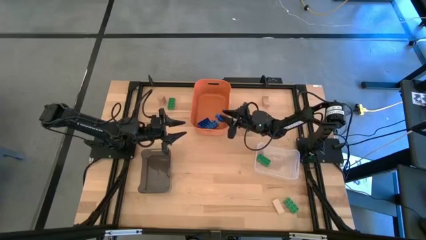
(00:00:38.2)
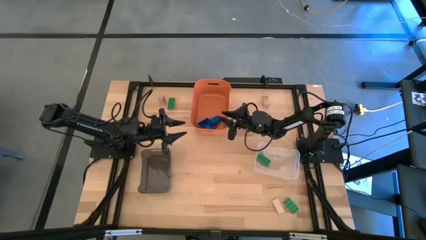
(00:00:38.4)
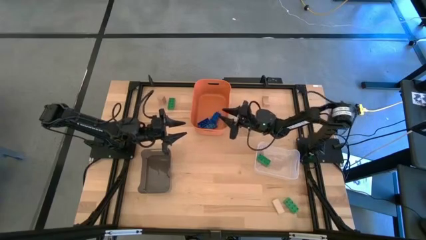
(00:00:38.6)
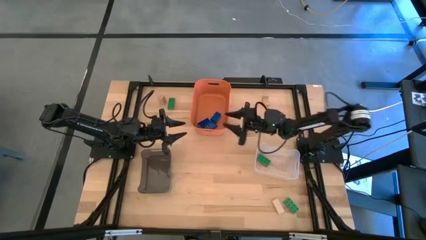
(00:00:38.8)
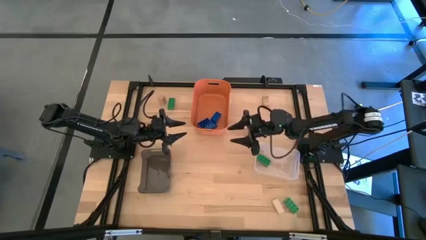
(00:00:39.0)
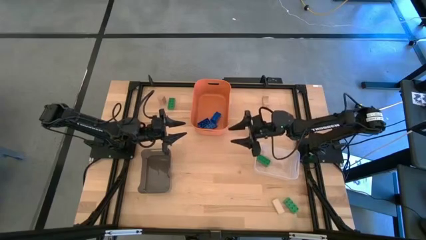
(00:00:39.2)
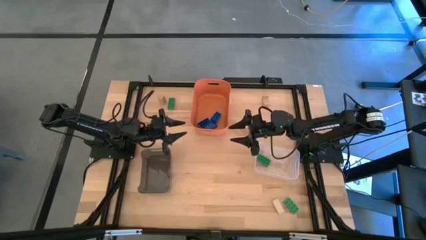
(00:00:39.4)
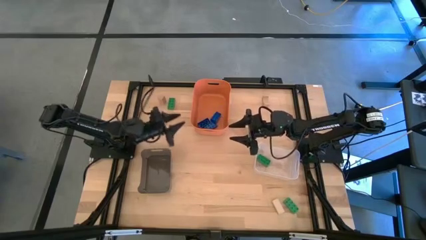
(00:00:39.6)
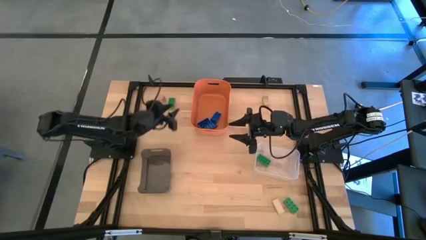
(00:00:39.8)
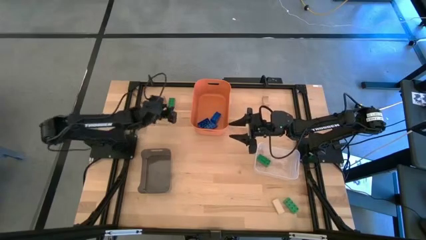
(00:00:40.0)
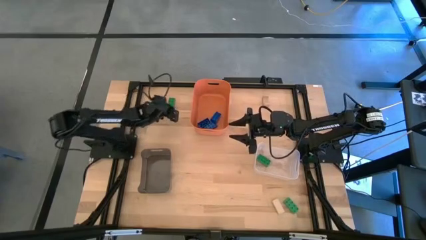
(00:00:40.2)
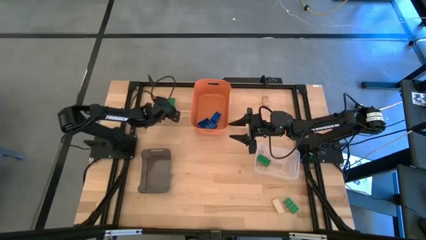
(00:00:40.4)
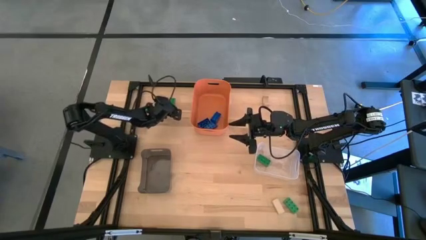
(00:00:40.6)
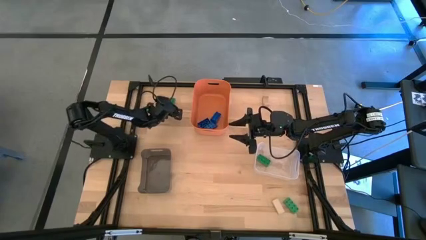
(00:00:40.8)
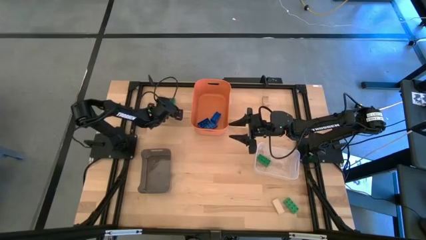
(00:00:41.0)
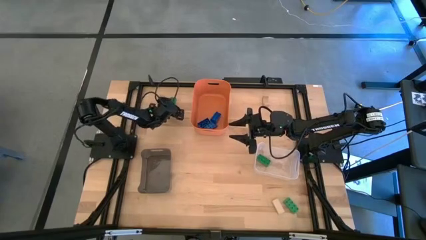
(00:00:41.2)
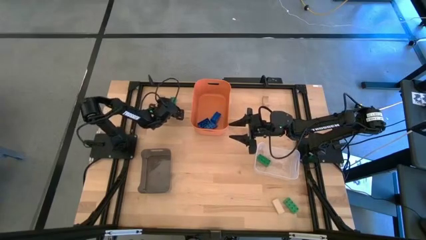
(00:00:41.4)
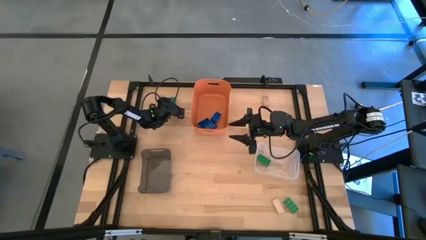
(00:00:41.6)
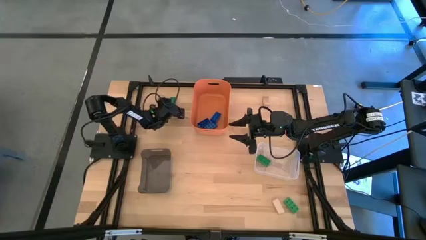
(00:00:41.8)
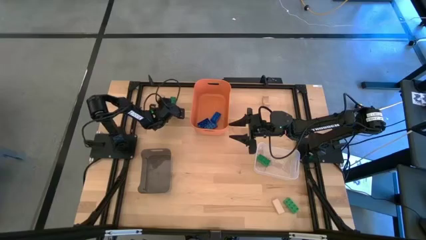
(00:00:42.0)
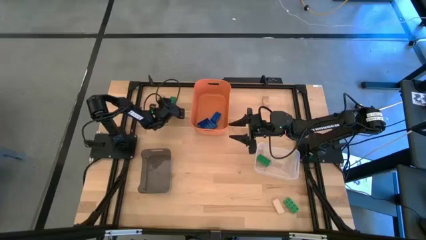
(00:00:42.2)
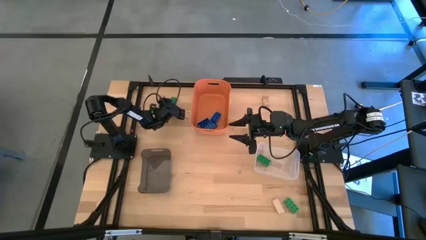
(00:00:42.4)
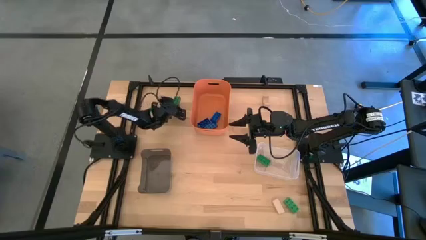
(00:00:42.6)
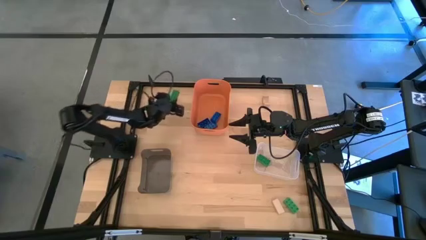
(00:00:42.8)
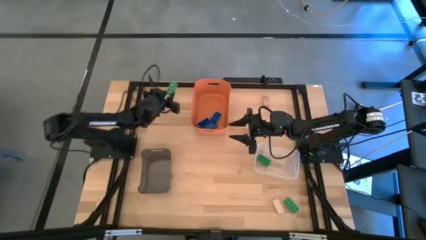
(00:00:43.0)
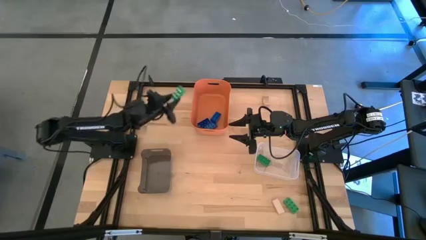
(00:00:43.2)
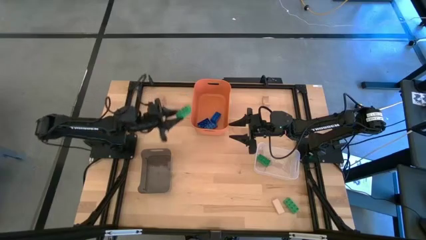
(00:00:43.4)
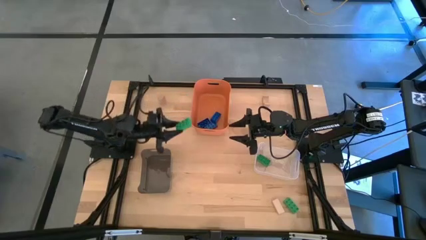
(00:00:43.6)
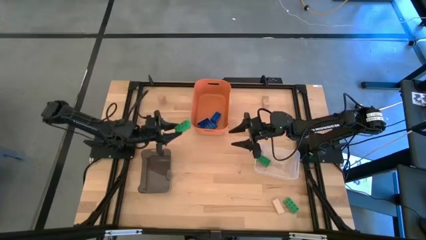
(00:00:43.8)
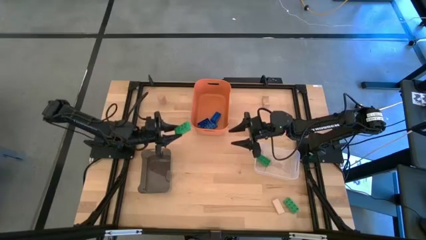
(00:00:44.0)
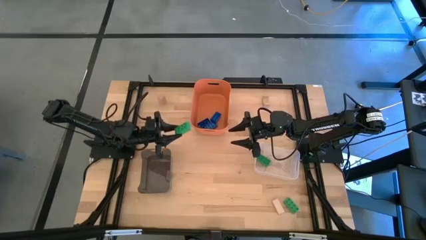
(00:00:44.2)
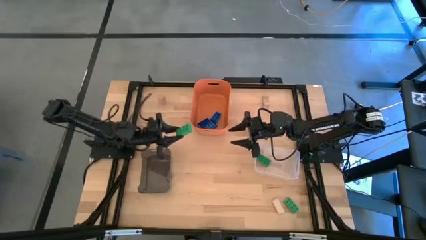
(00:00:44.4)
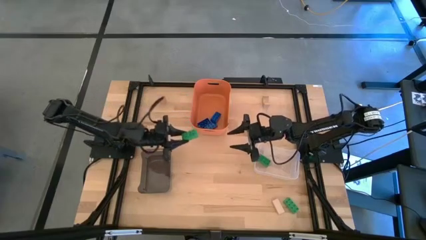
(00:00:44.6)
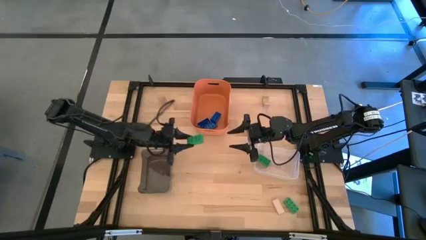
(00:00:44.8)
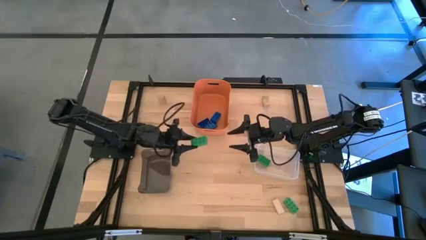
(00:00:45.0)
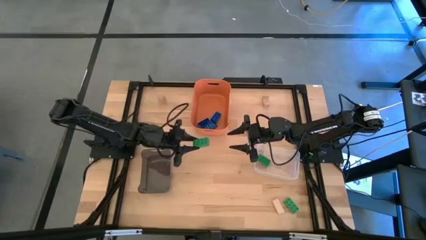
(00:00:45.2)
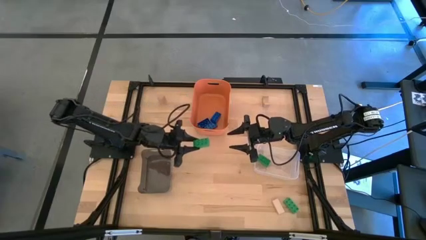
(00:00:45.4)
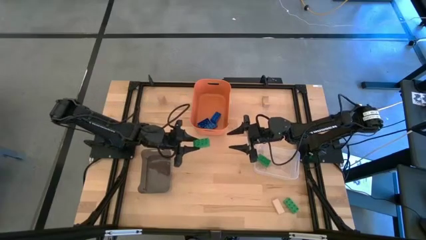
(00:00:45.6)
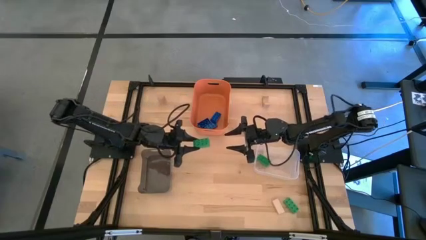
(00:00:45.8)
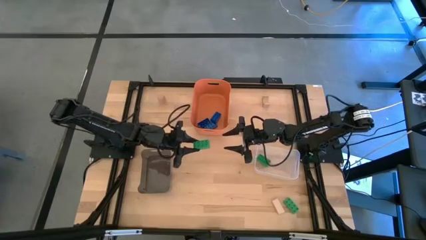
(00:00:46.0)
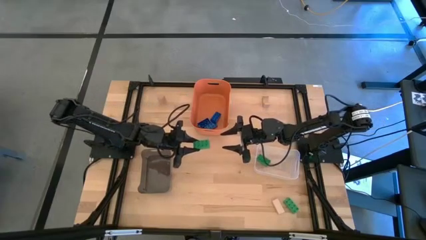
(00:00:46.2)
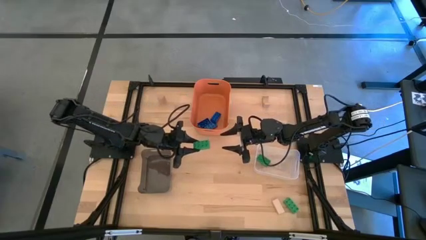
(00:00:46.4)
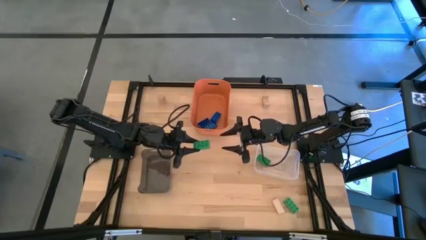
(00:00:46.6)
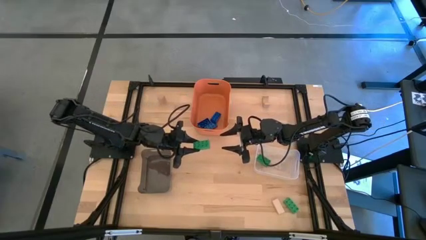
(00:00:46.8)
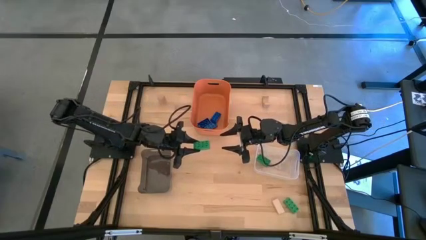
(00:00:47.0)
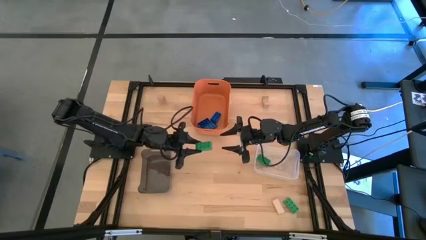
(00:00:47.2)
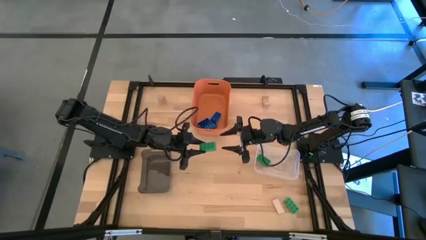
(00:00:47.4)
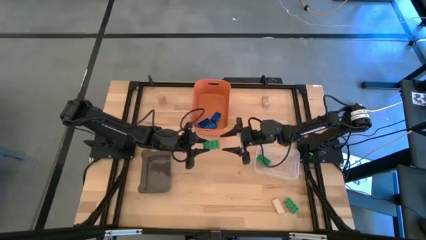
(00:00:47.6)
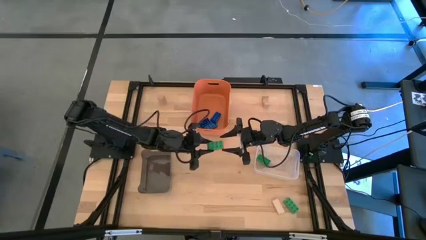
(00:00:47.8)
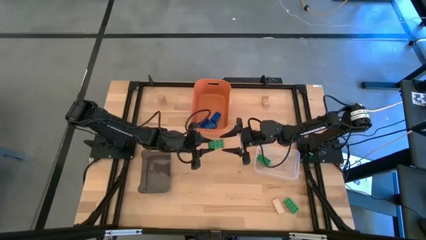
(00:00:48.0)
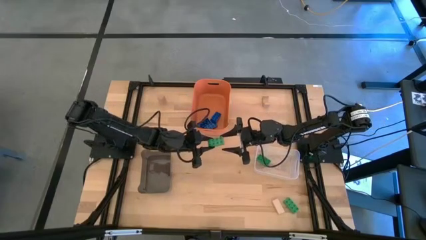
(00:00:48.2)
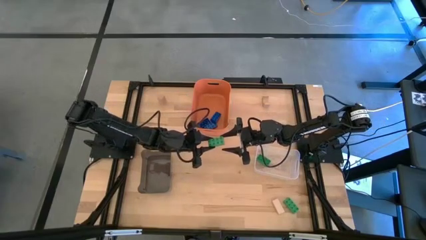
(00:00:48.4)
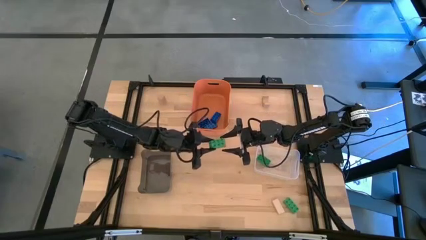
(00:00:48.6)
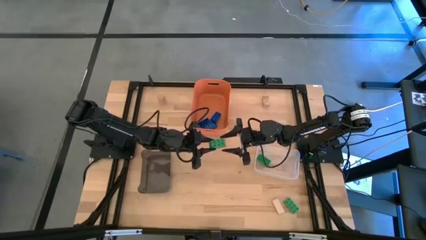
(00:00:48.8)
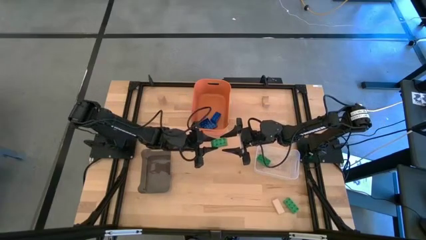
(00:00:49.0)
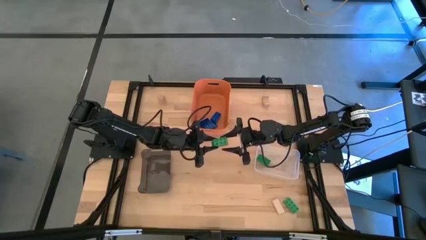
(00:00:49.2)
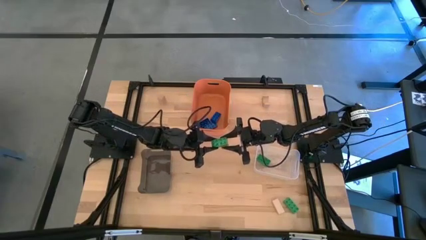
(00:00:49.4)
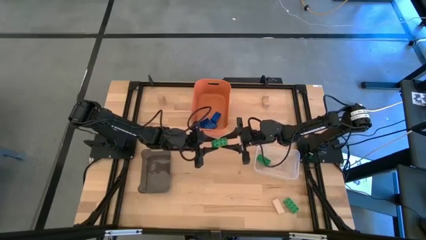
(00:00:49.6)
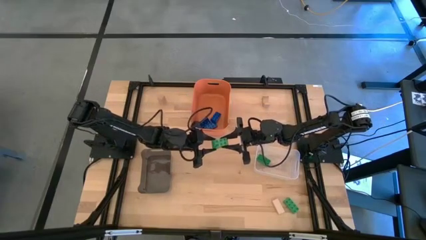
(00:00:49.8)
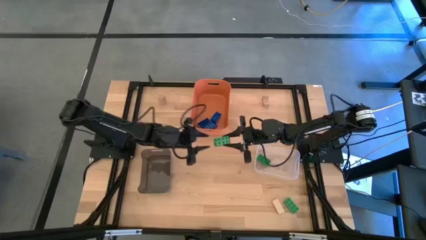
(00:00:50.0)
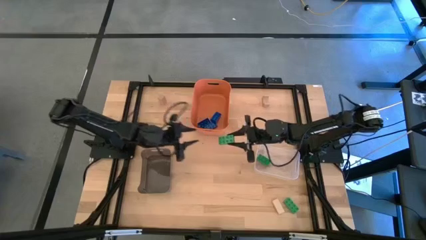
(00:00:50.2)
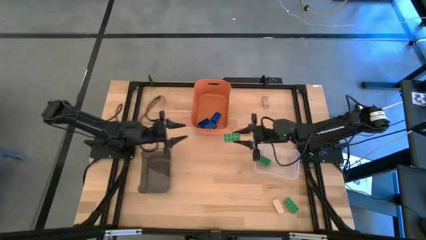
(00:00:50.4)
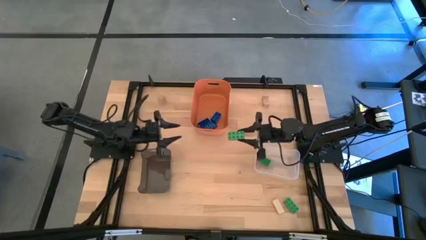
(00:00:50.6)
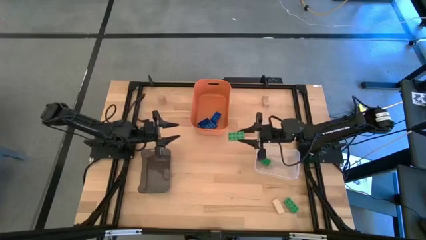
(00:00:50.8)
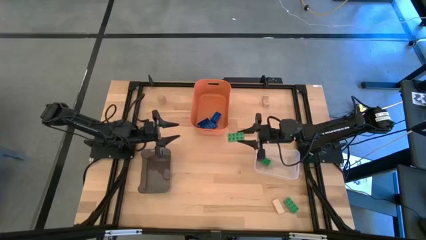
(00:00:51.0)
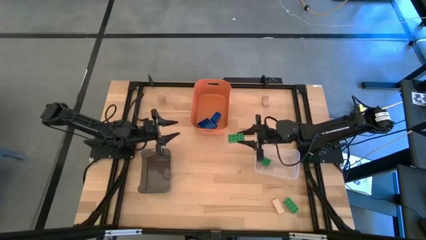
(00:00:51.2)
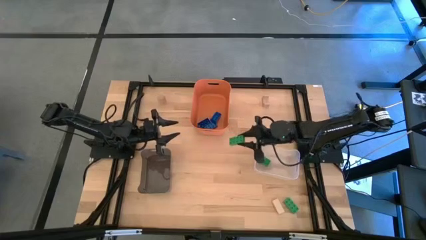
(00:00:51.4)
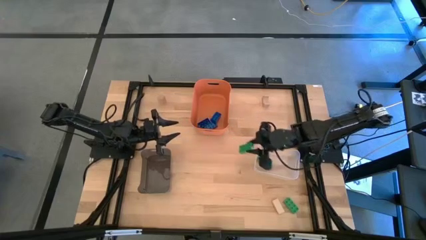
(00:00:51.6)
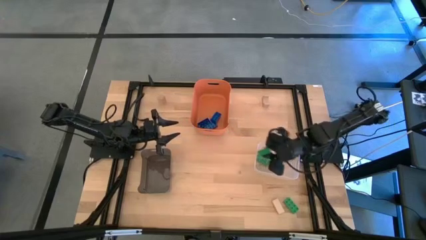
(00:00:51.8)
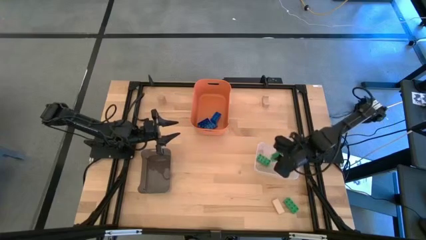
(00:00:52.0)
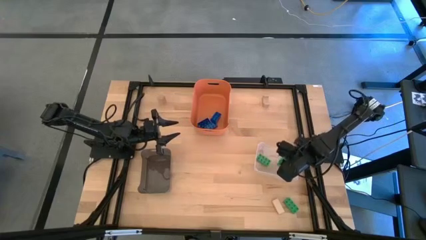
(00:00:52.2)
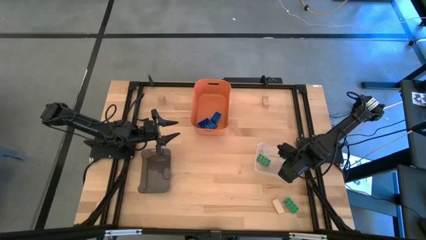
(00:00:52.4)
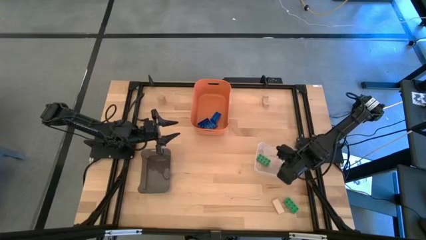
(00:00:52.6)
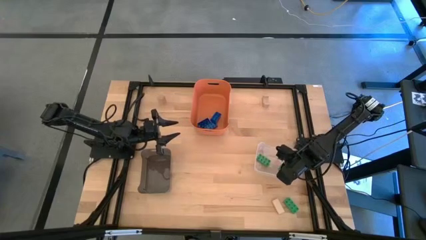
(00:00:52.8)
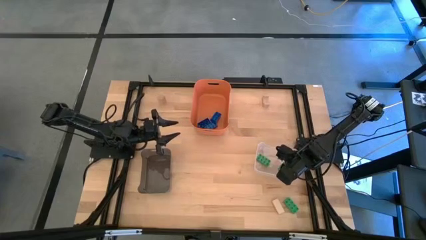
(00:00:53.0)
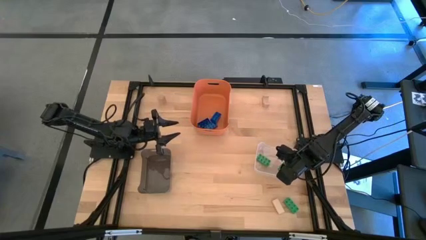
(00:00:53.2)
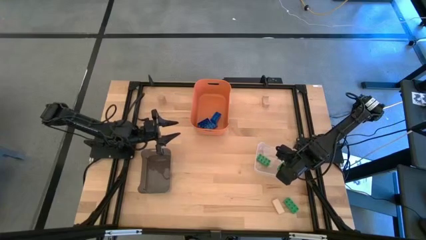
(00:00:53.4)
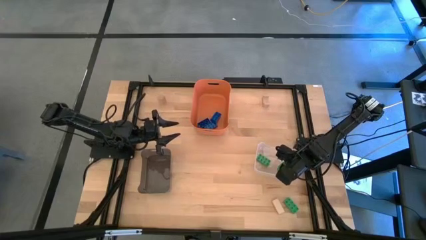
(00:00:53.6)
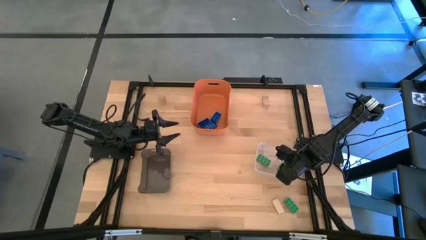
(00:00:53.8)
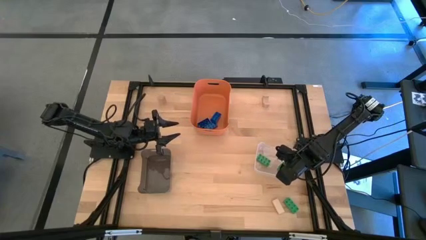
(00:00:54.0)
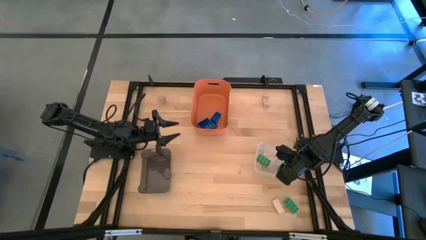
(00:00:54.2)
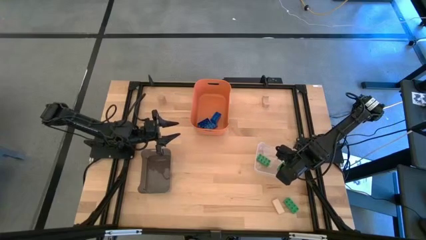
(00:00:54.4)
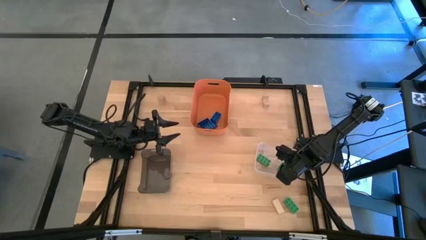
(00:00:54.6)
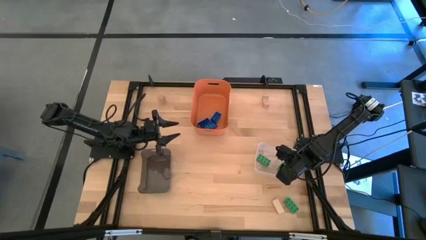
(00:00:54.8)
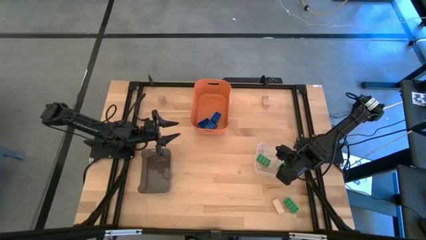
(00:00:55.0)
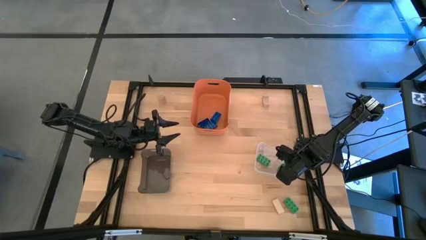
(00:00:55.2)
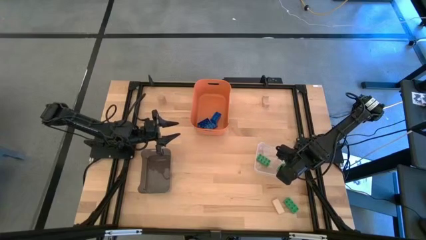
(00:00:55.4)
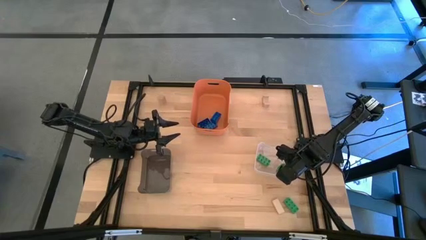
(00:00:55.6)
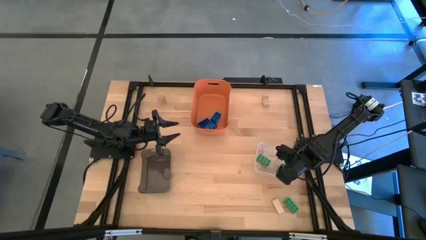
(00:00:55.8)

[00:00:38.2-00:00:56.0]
Task: Sort & place blocks by color
Put the top green game piece into the transparent bin
